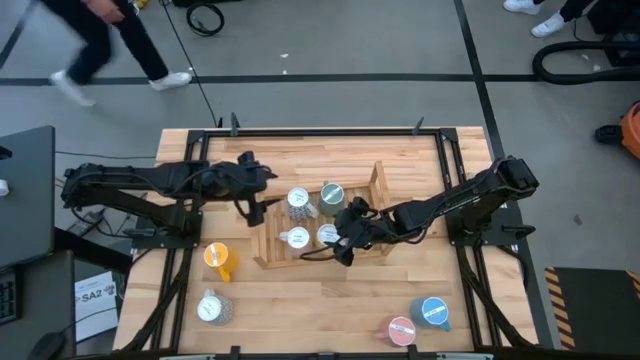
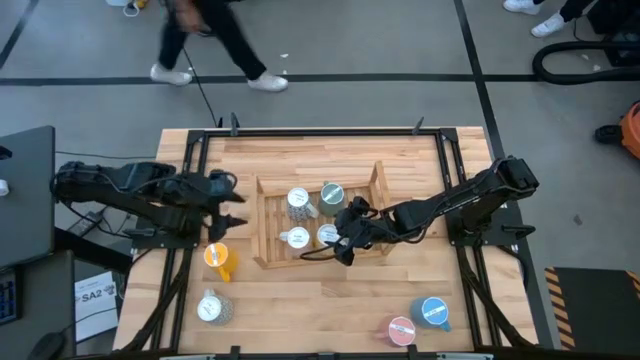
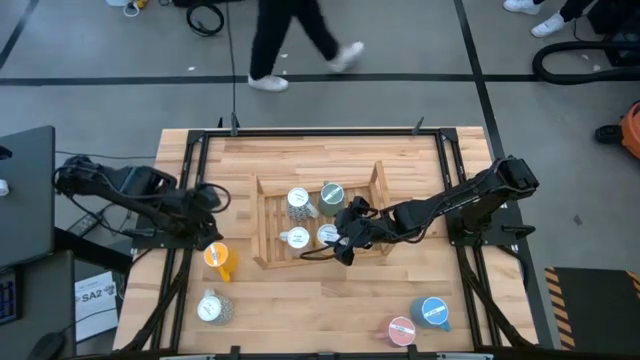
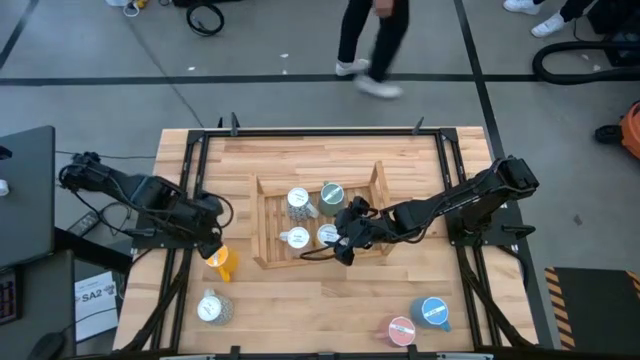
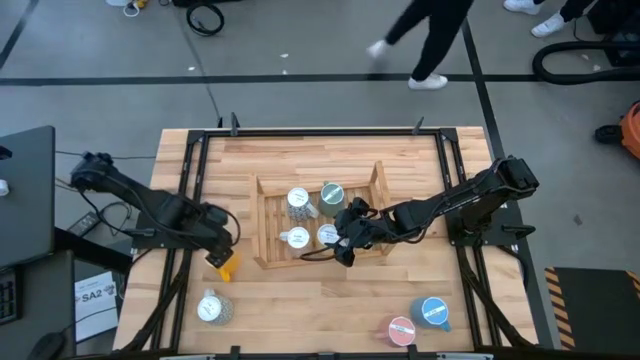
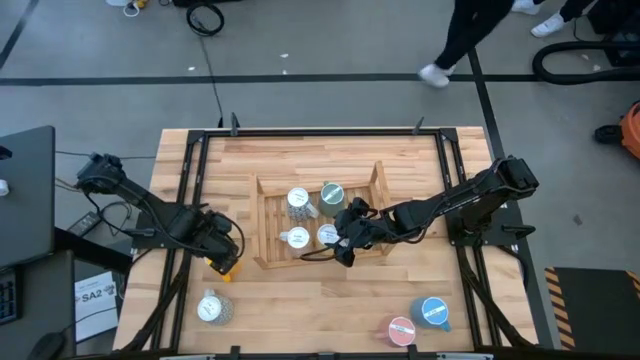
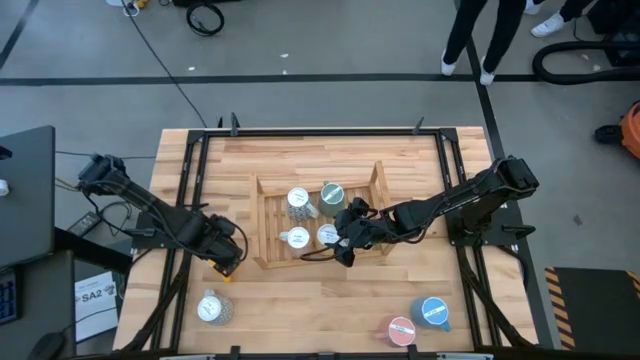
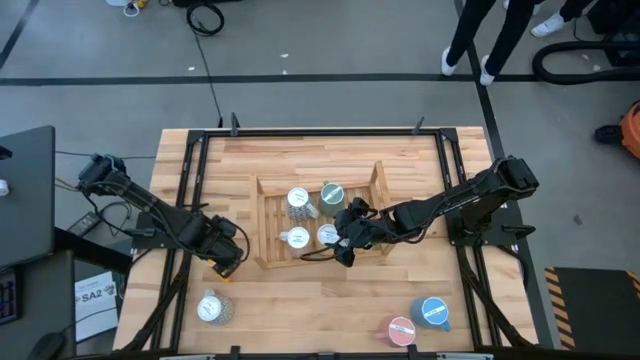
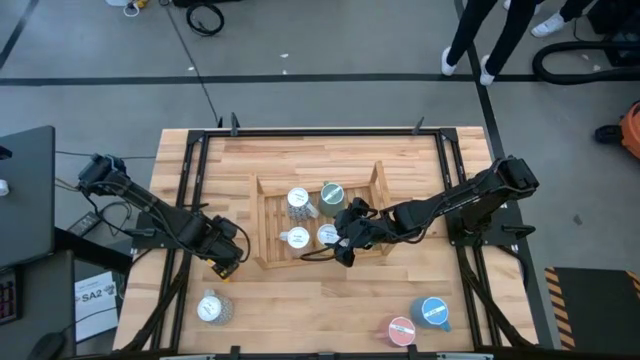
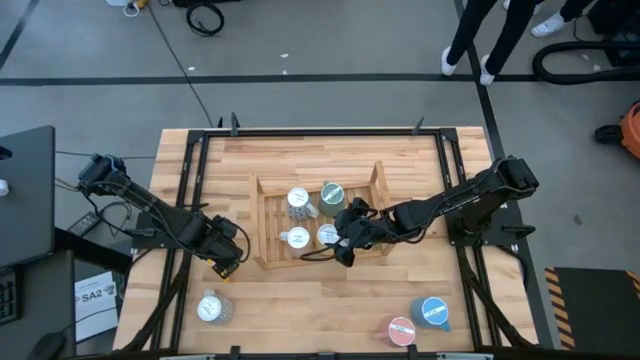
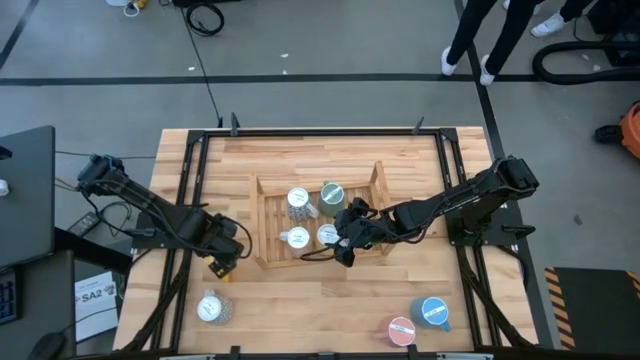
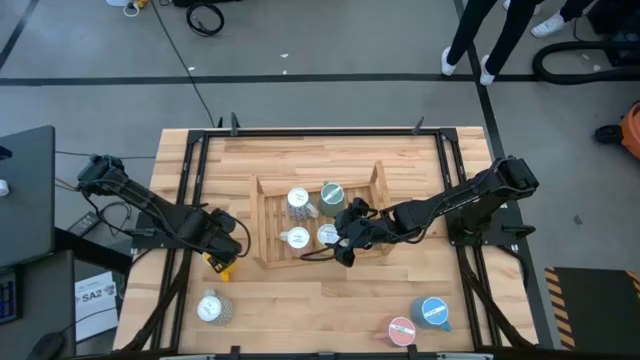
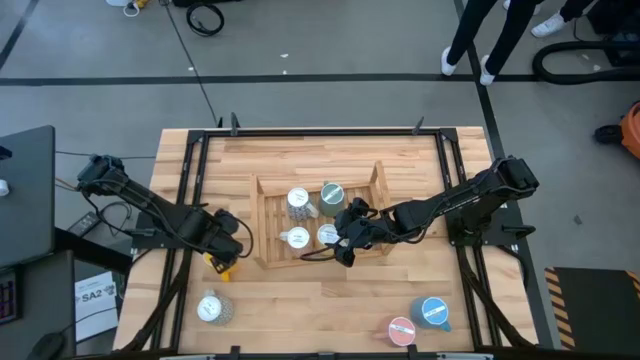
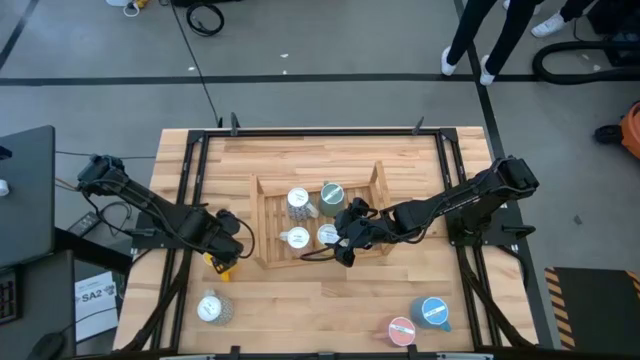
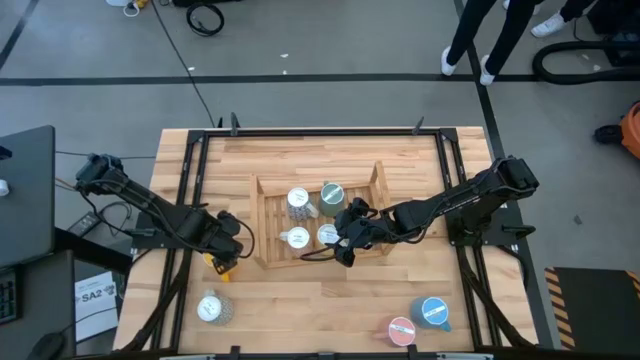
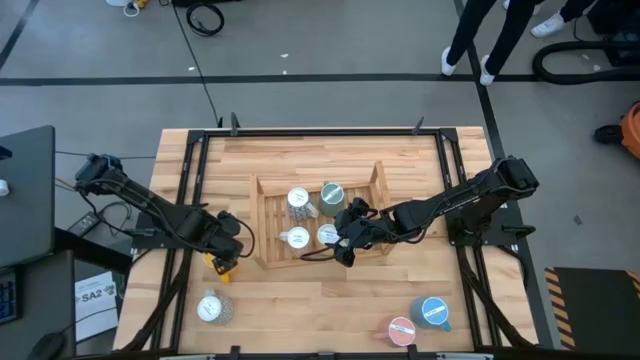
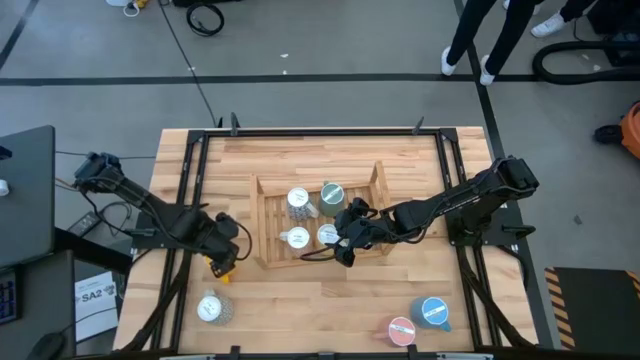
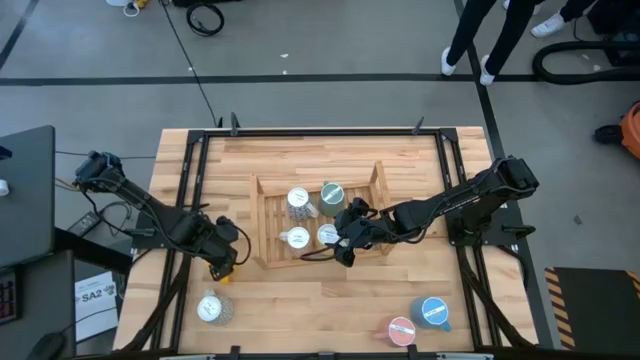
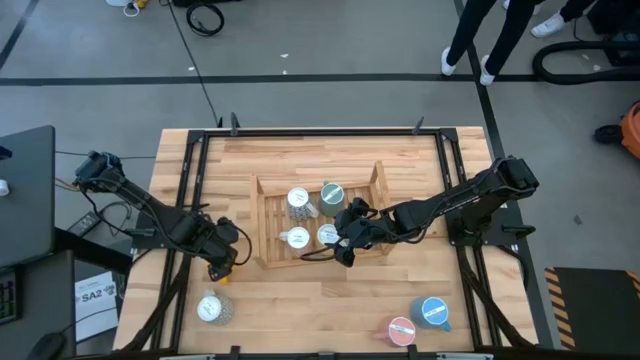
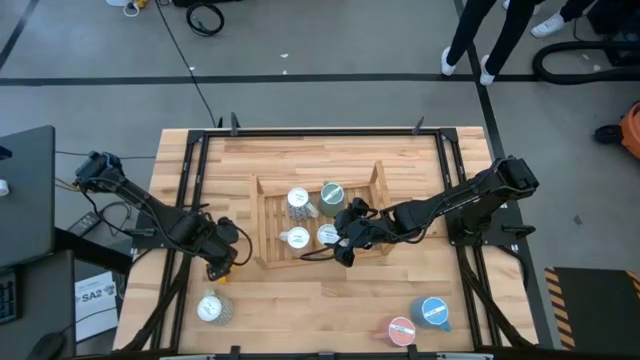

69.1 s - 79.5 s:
Task: Place coffee mugs
Put the yellow mug on the shelf

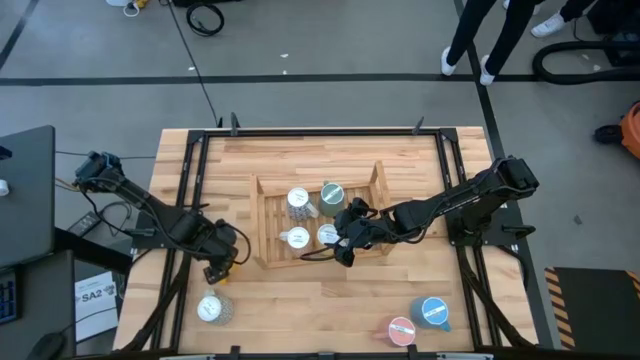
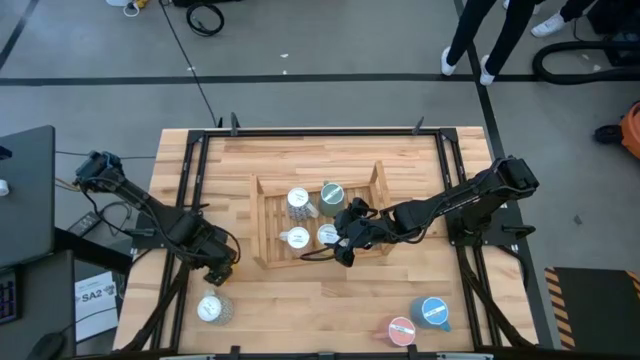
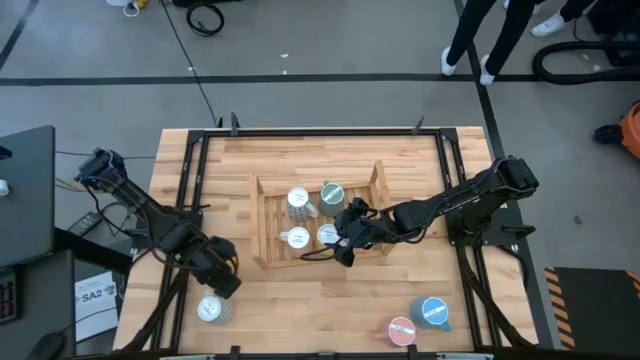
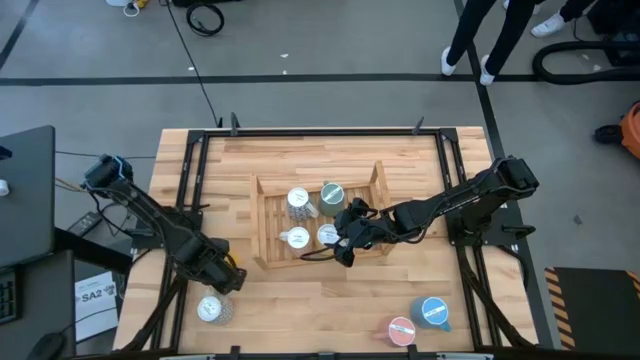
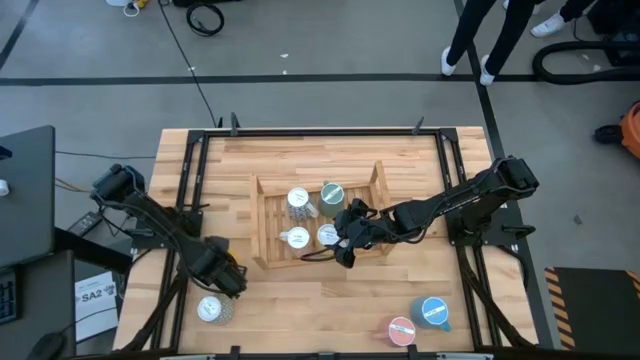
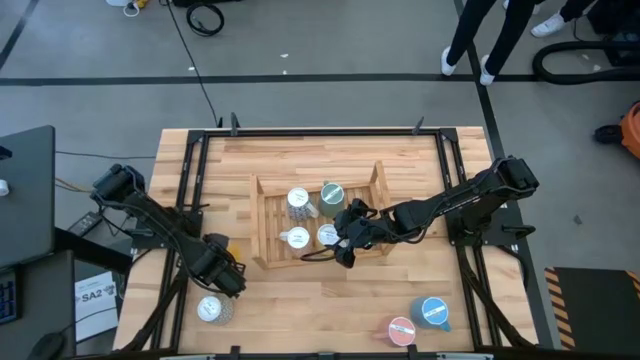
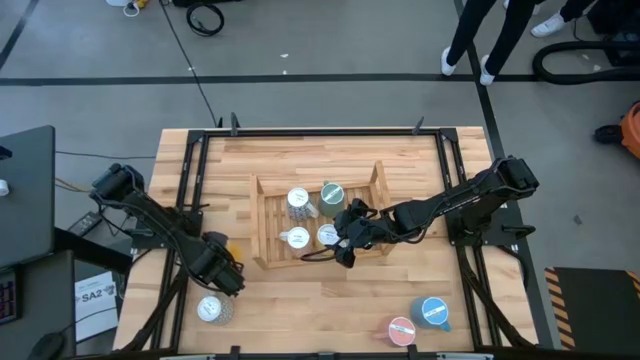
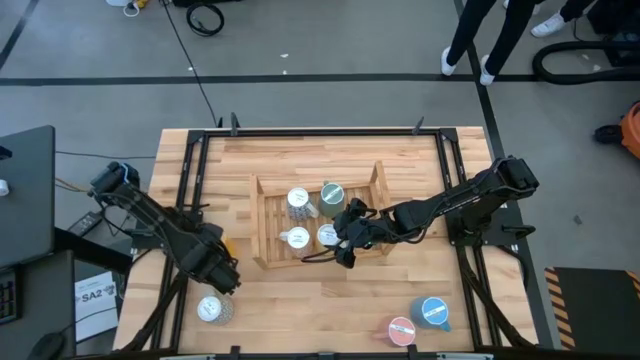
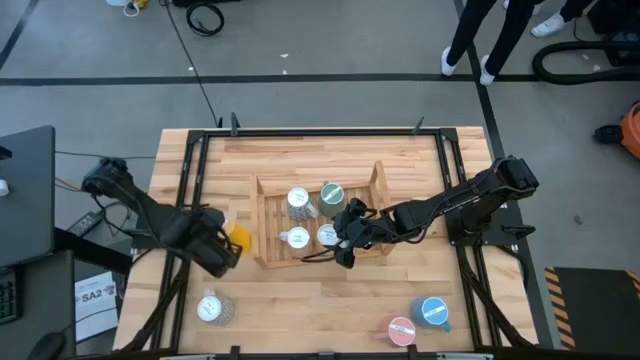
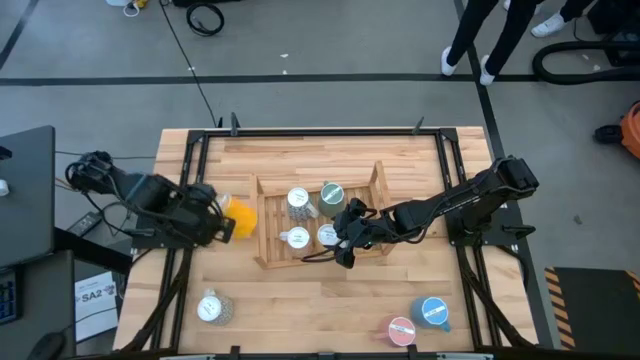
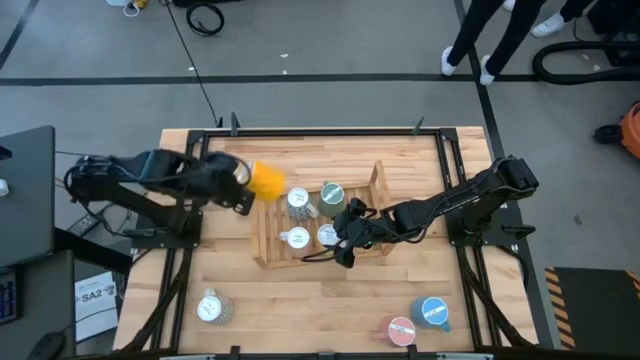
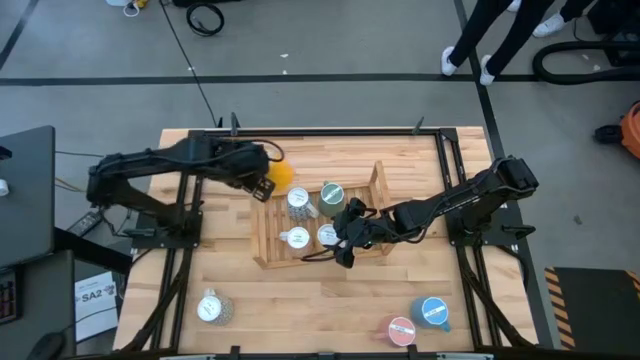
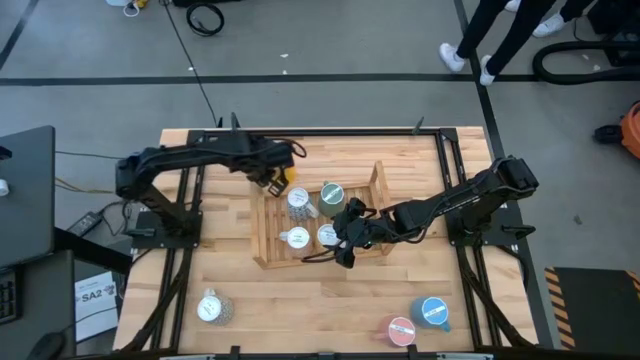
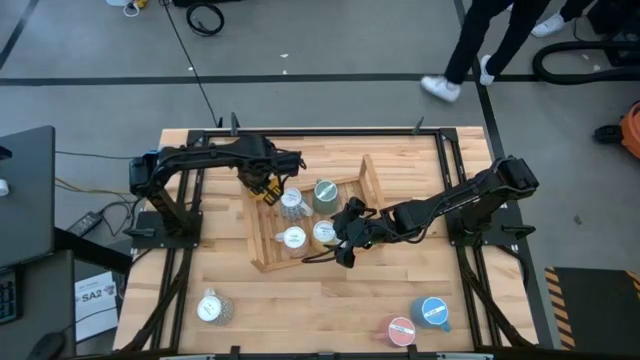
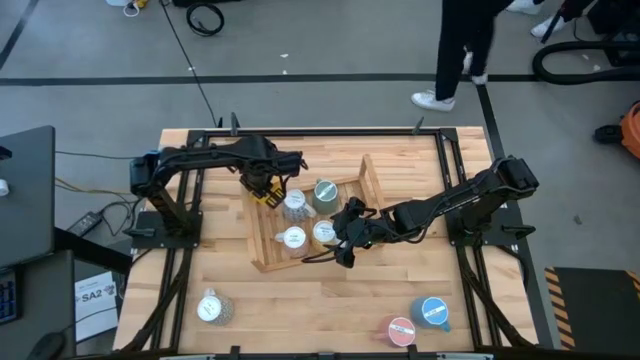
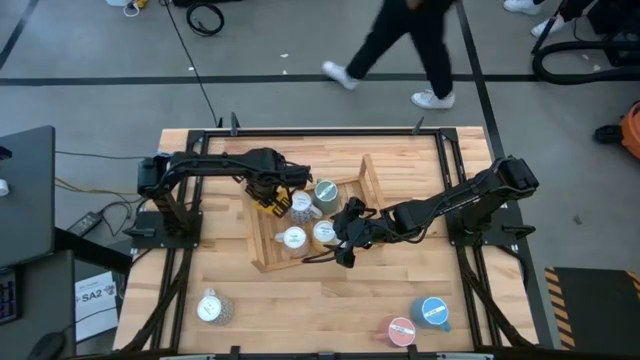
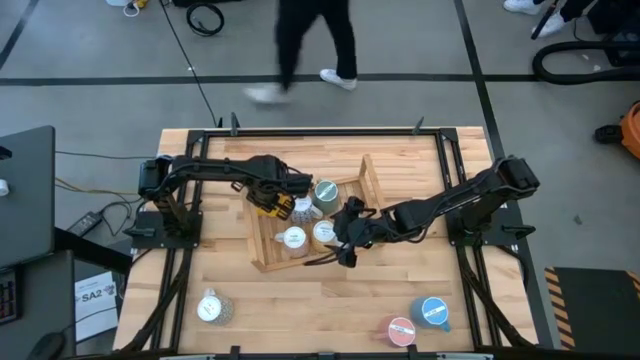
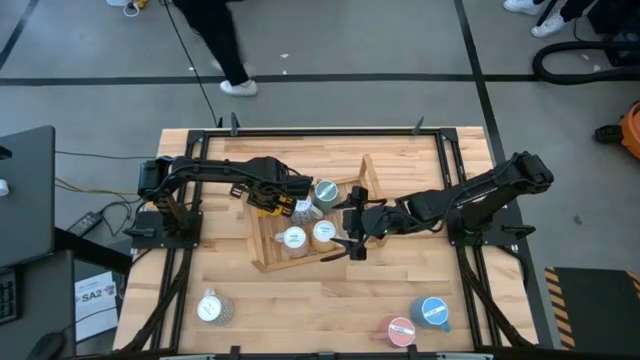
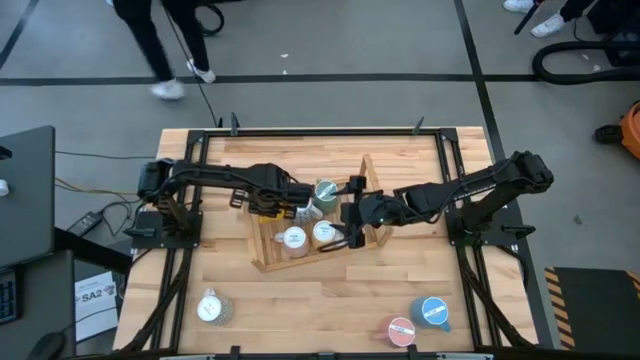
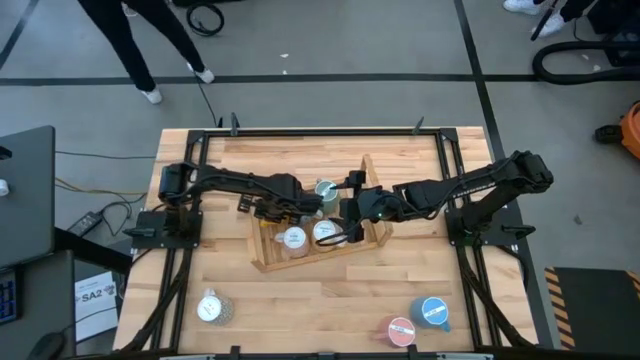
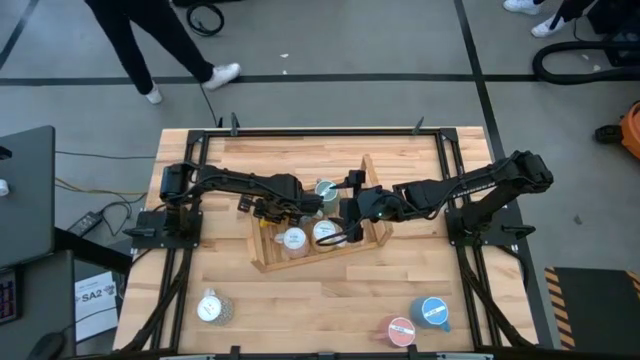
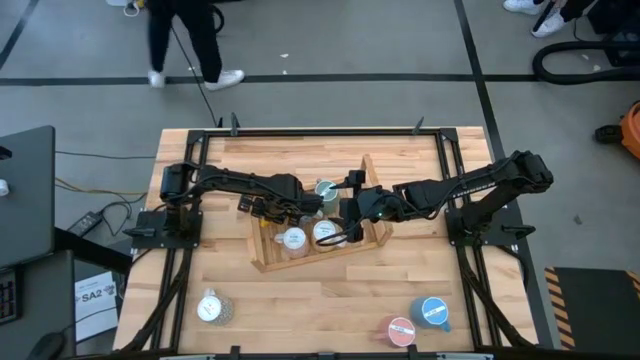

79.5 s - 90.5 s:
Put the yellow mug on the shelf

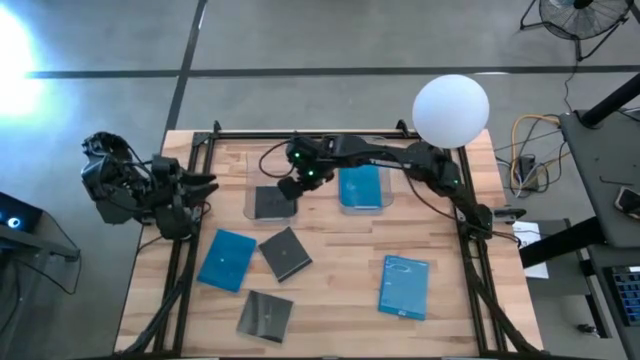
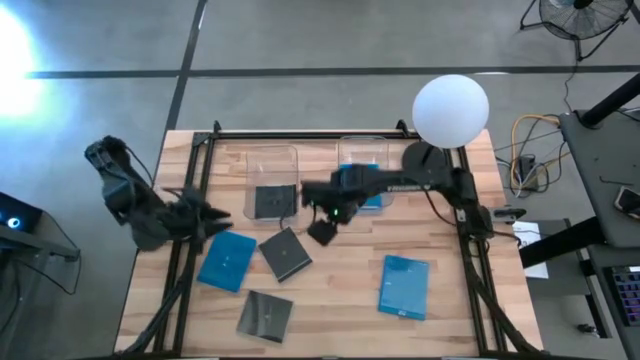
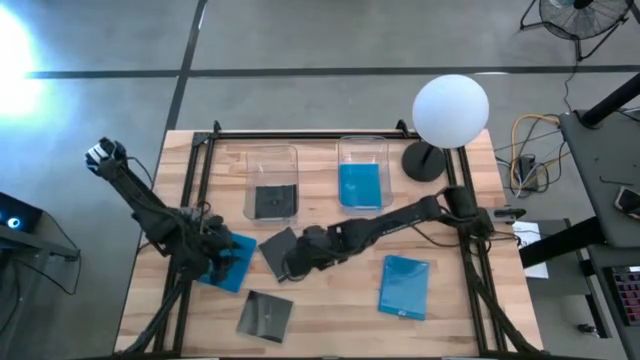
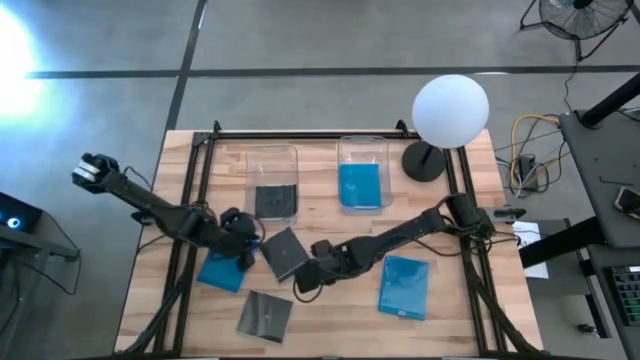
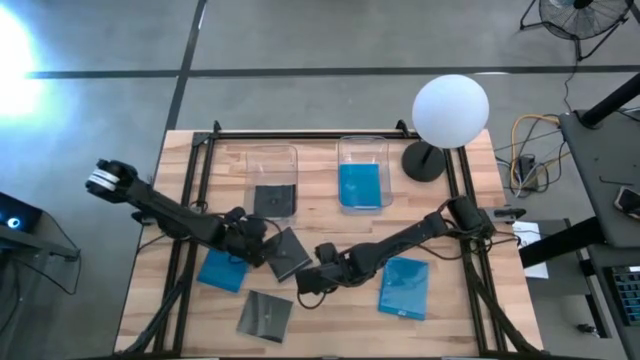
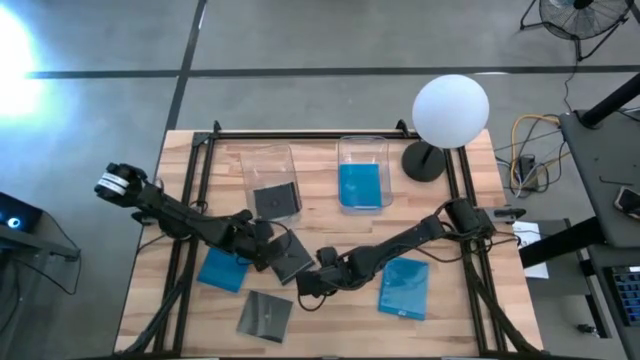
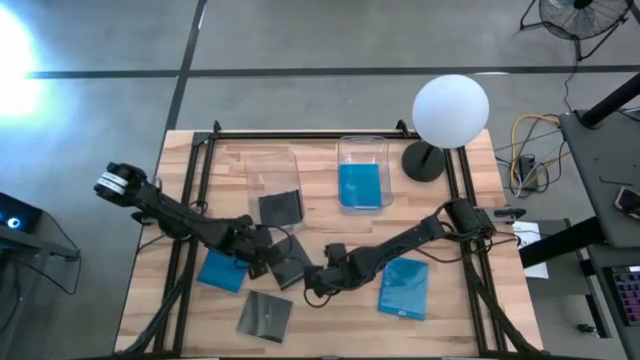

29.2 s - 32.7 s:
Task: Pick & place jewel cases by type
Adjust the top black CD case on the table
